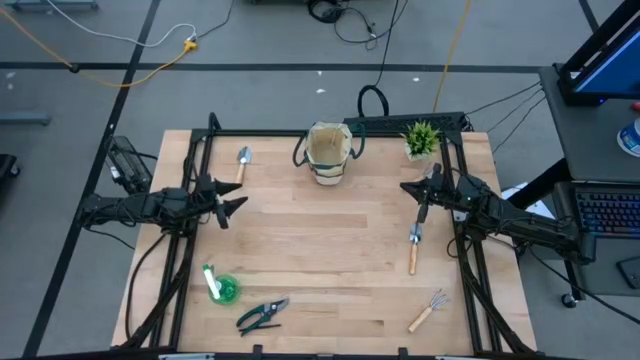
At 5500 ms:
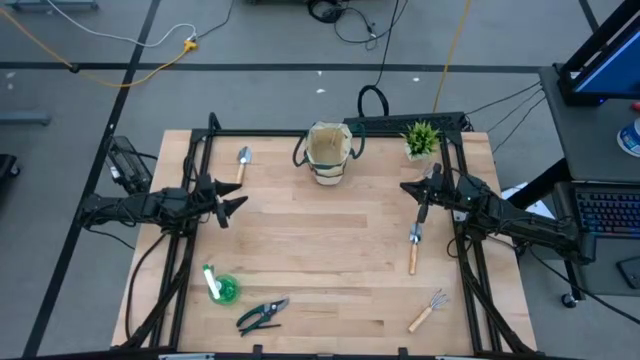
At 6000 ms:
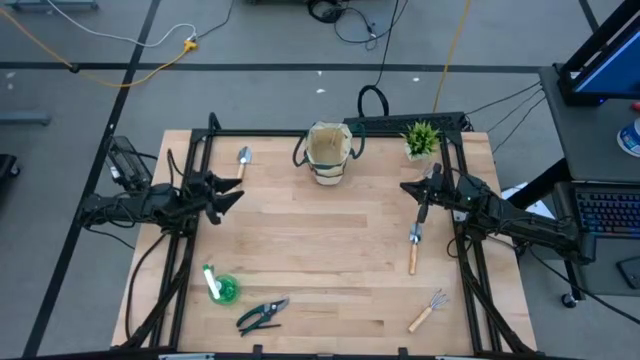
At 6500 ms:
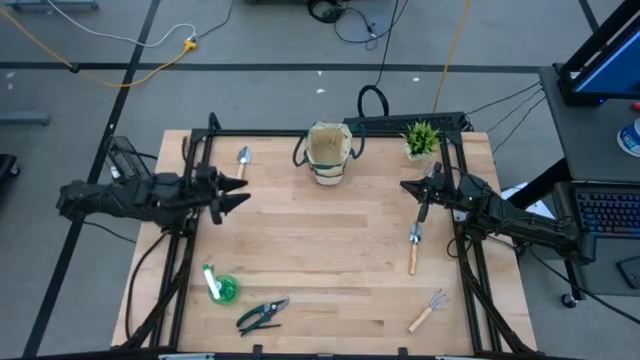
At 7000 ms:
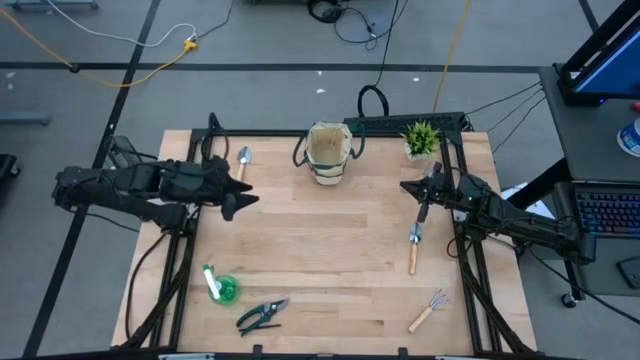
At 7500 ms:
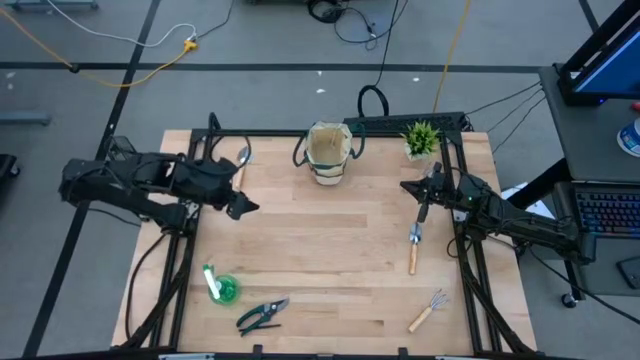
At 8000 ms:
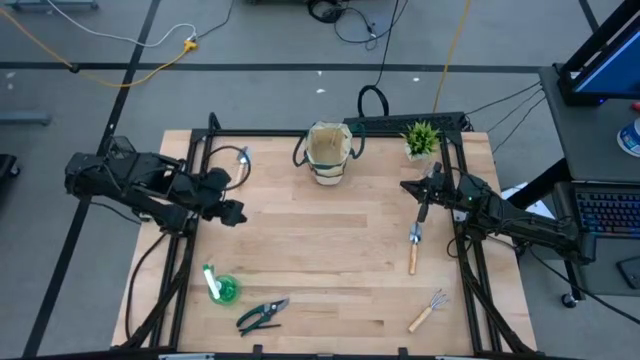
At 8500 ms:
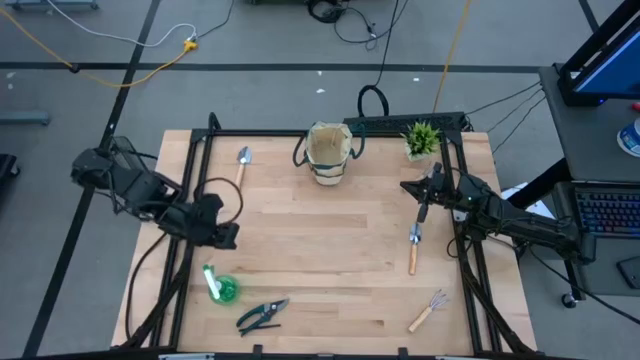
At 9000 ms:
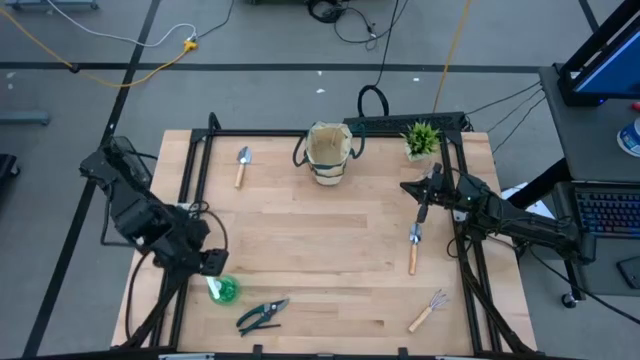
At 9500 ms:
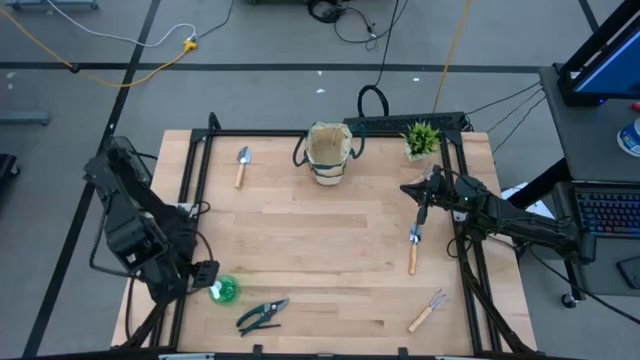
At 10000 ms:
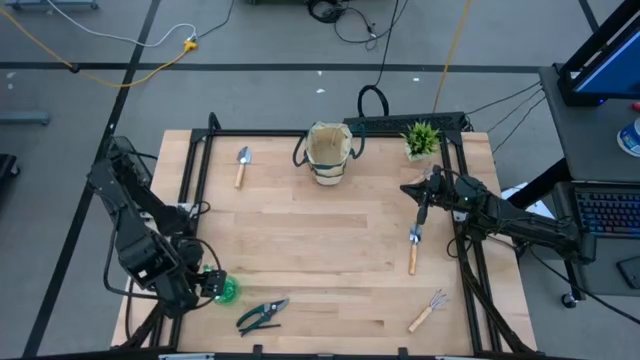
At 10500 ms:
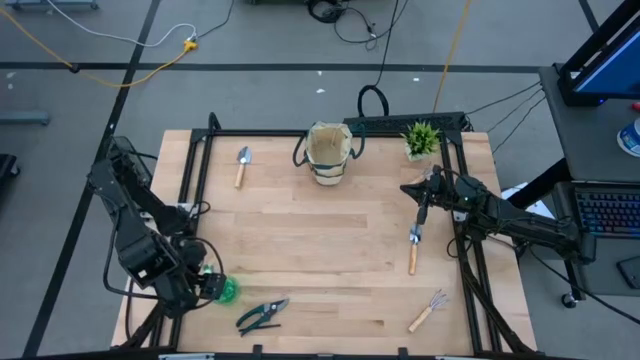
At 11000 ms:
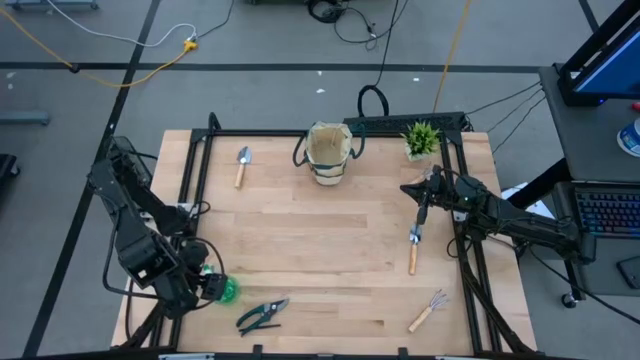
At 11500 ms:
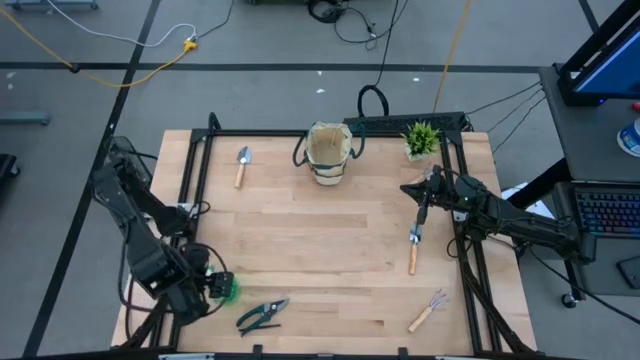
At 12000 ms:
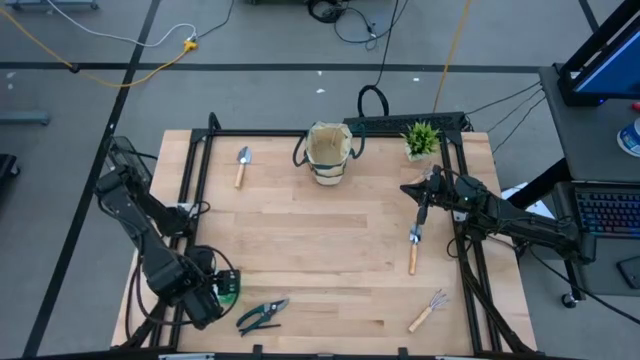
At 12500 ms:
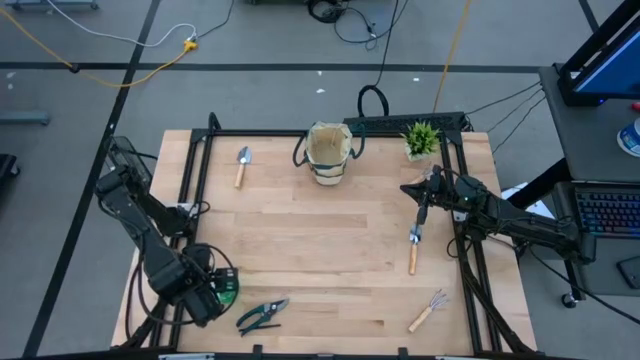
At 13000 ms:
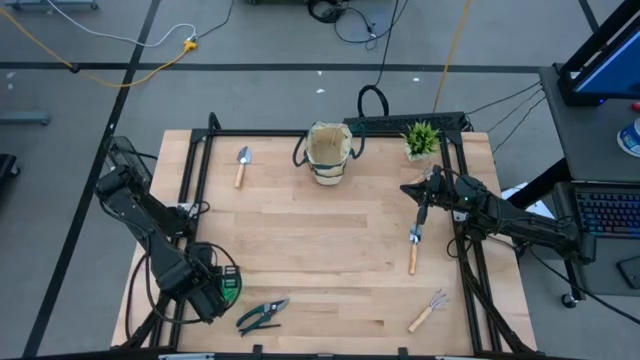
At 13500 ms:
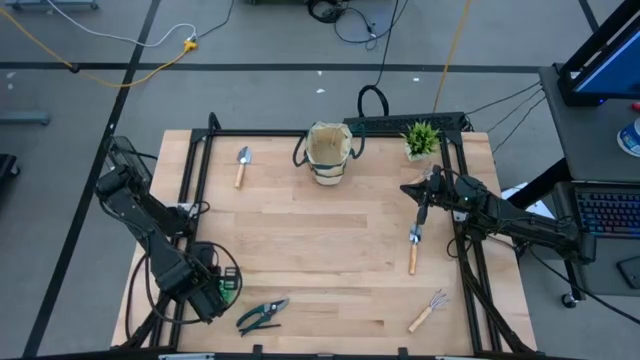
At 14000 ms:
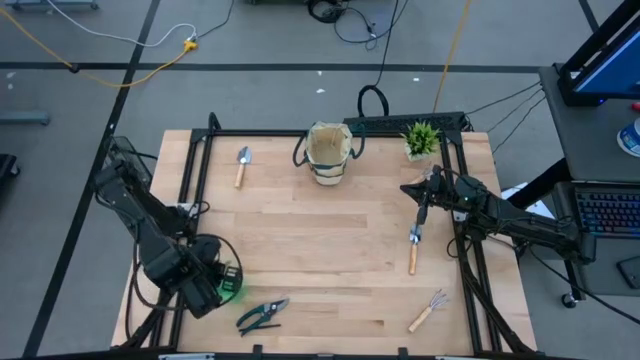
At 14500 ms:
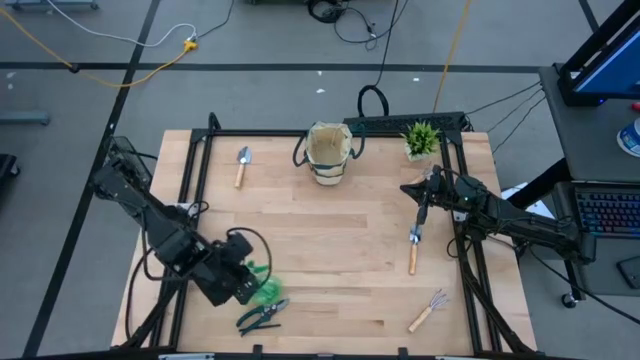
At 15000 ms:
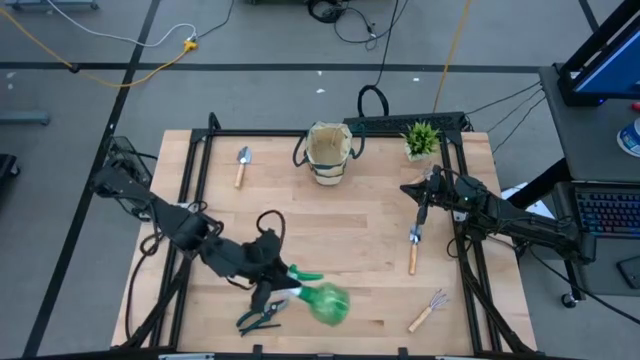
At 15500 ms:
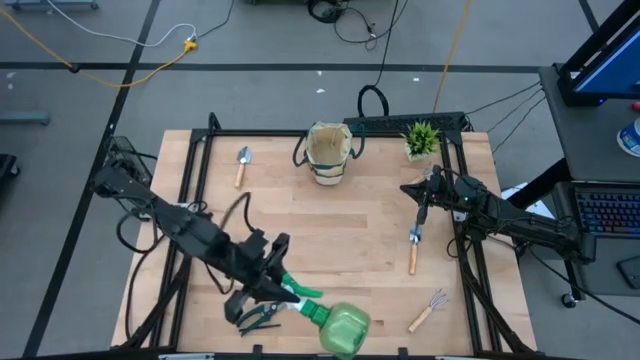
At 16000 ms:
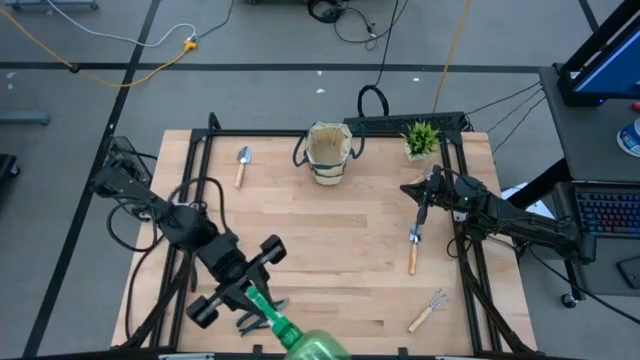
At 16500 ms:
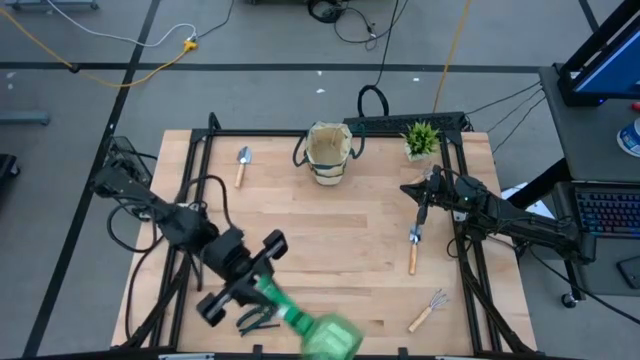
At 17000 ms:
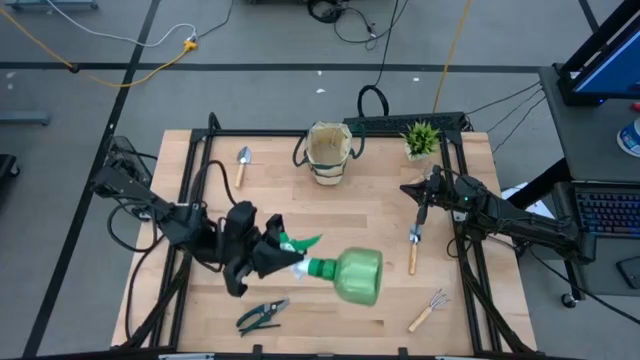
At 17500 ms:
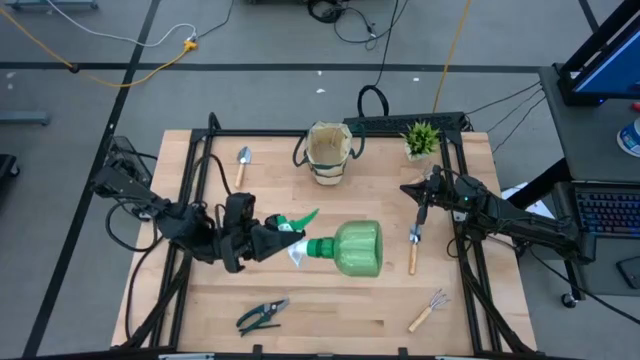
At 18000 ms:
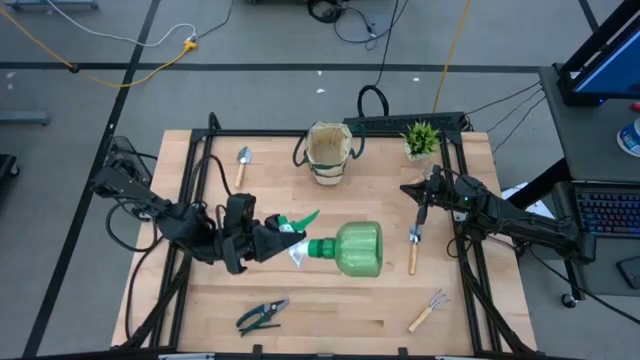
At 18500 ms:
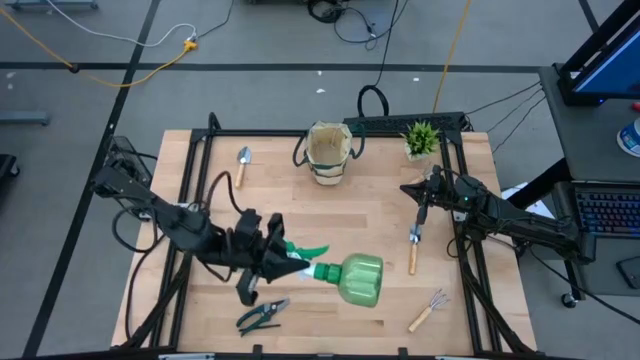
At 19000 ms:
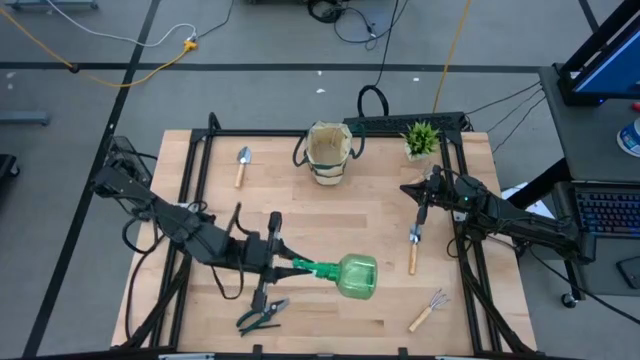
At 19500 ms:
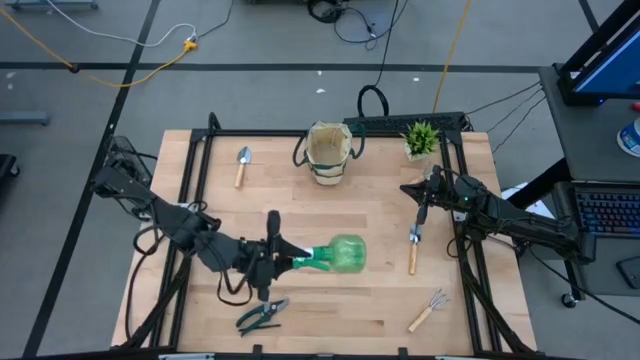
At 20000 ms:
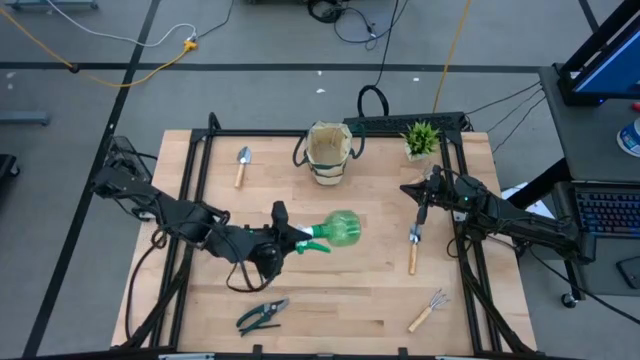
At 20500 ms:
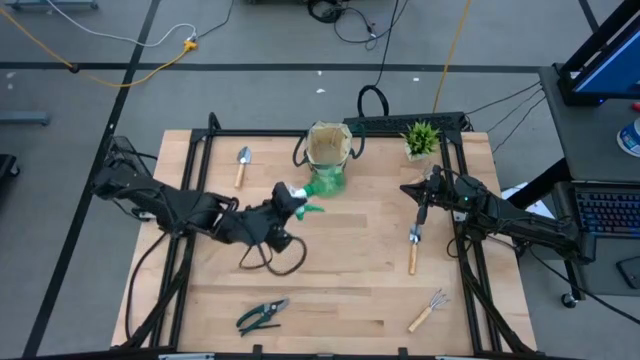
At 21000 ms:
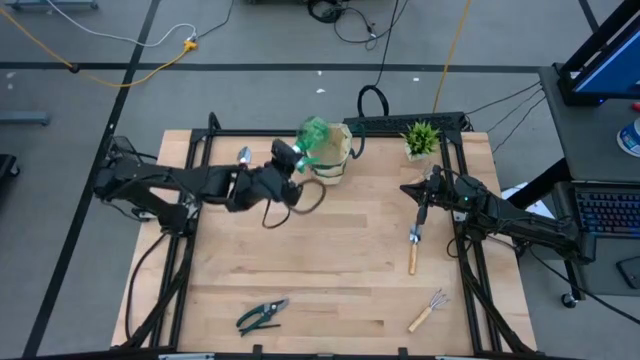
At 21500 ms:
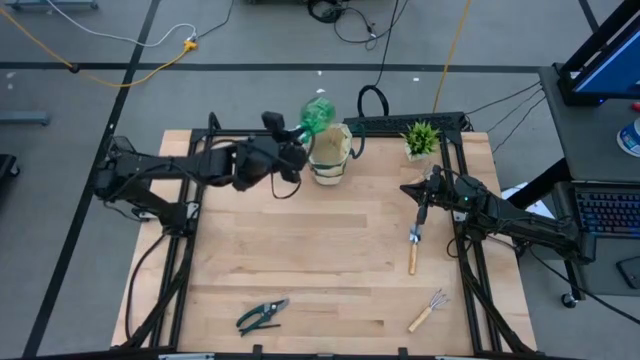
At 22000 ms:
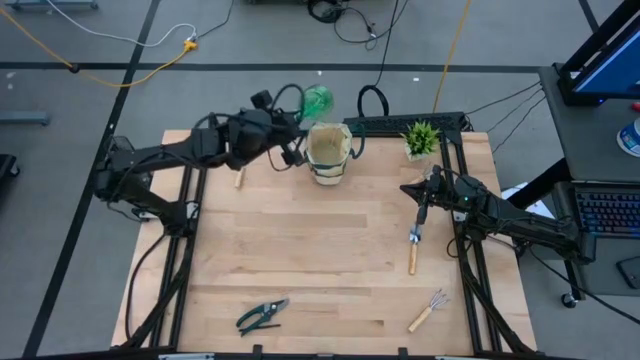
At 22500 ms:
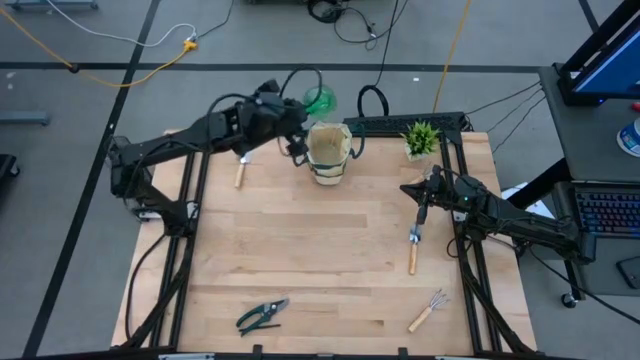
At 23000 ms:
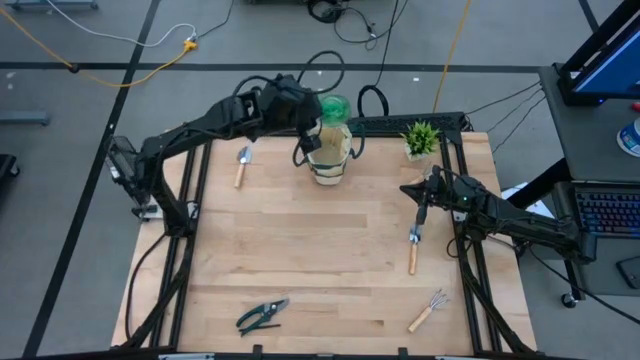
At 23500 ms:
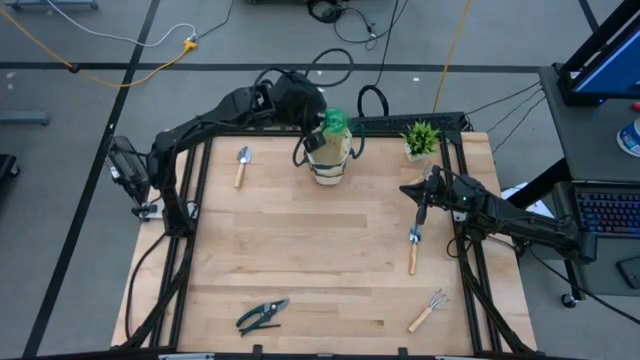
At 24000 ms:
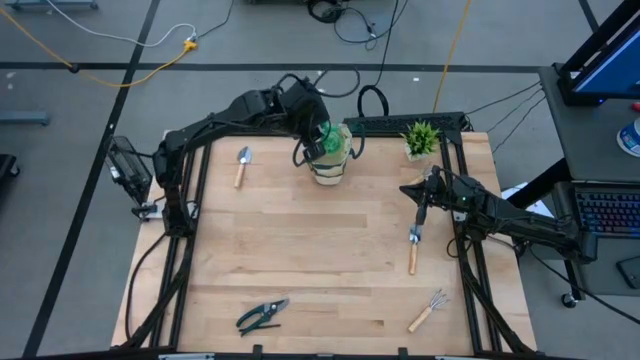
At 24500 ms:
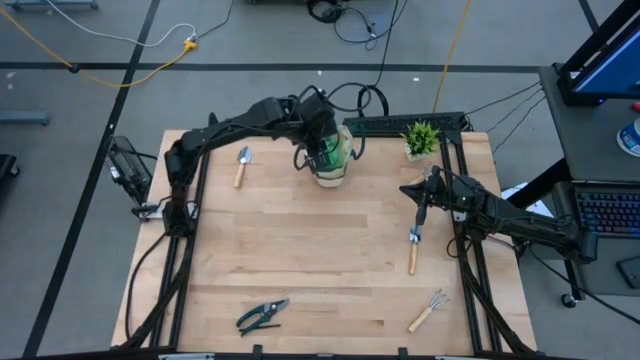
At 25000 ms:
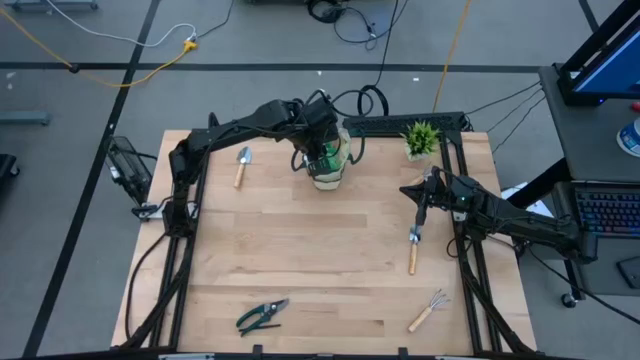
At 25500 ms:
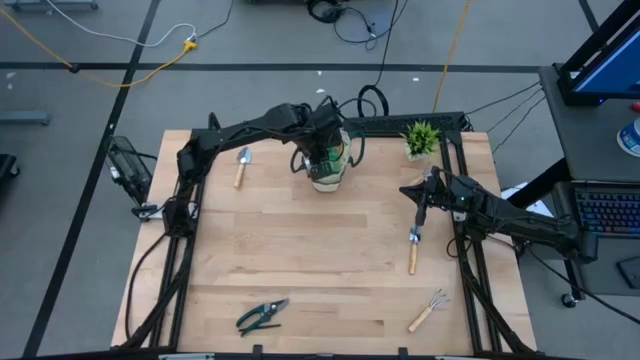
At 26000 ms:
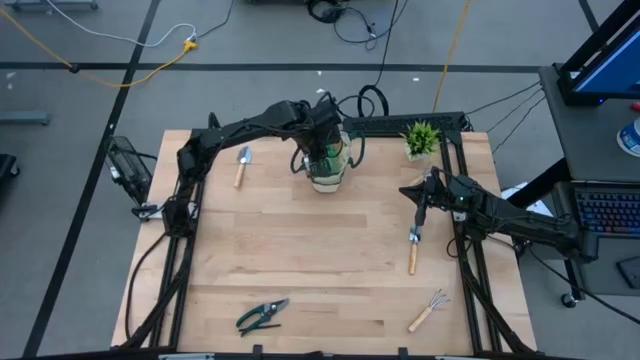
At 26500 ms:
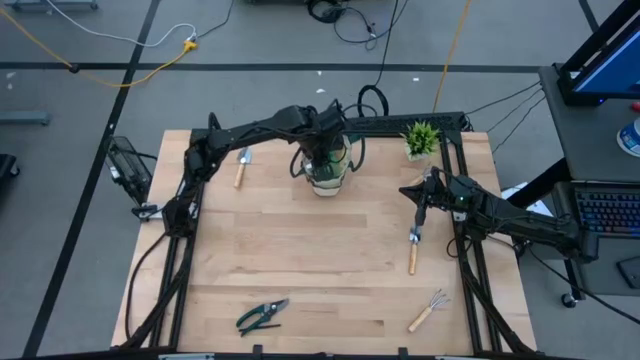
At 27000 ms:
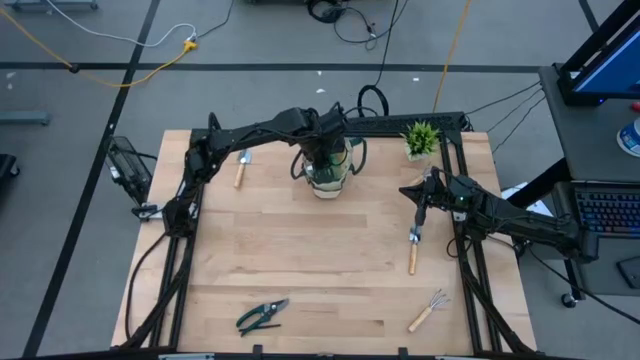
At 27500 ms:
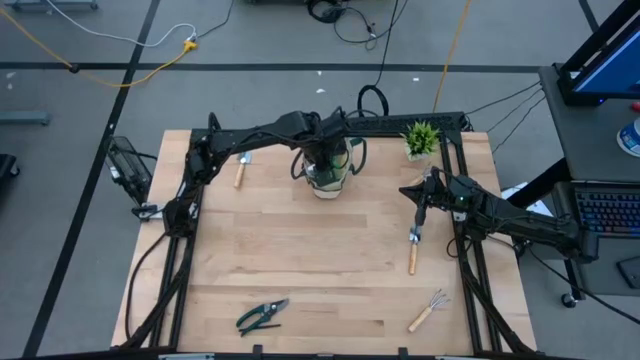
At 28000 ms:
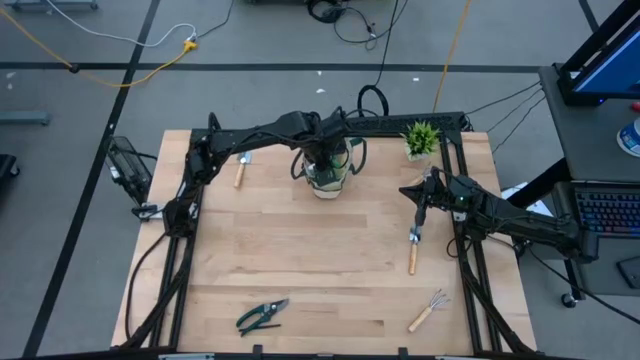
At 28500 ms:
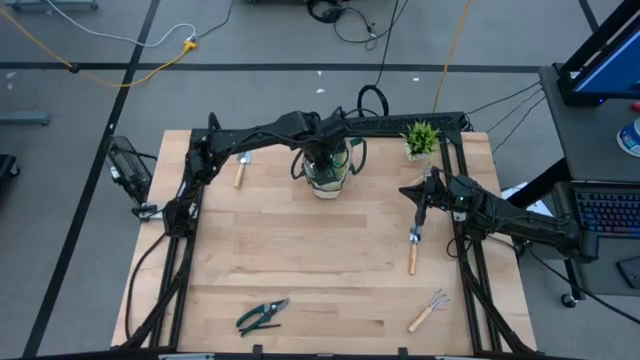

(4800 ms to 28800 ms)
Task: Pick & Place Garden tools in Gardening bag
Put the green spray bottle into the gardening bag
